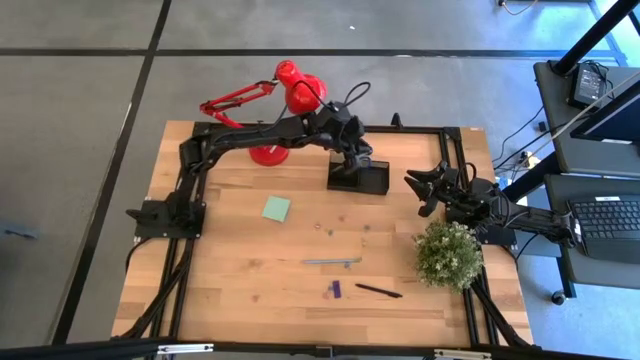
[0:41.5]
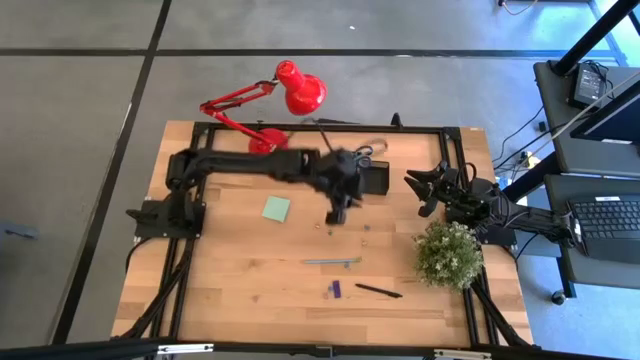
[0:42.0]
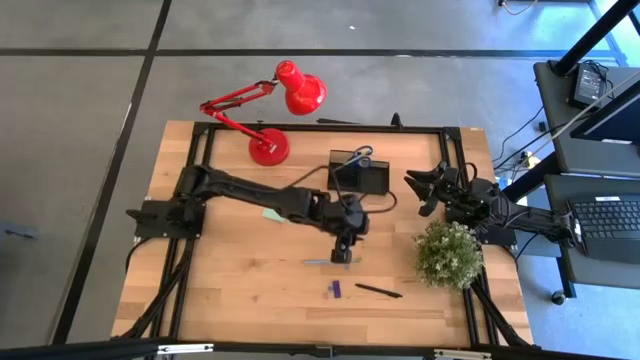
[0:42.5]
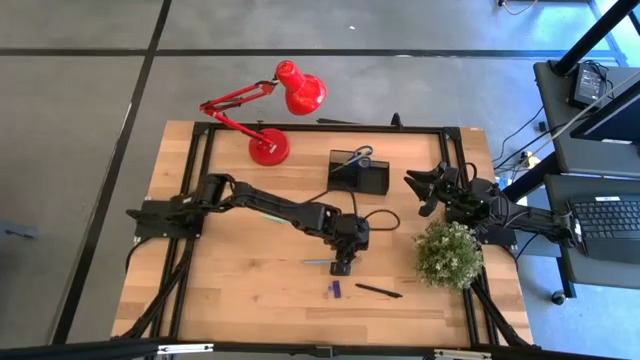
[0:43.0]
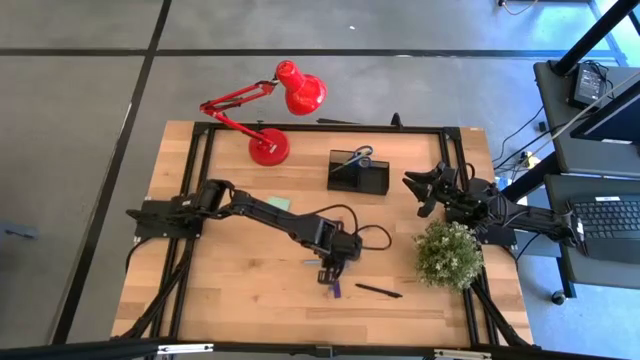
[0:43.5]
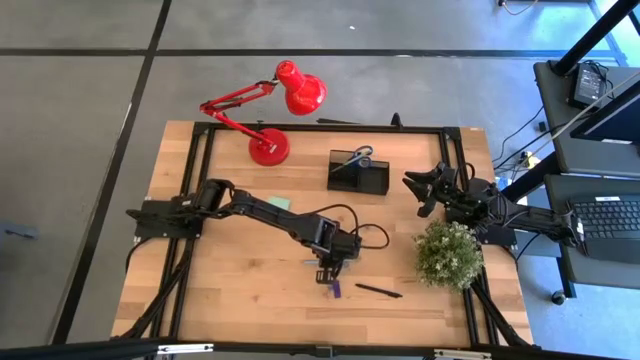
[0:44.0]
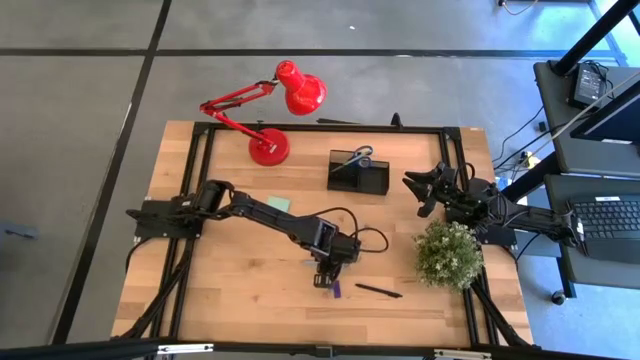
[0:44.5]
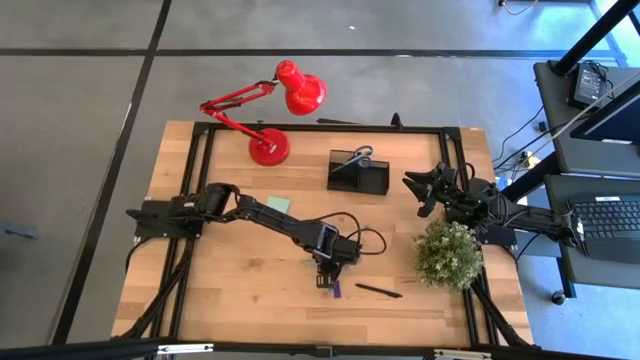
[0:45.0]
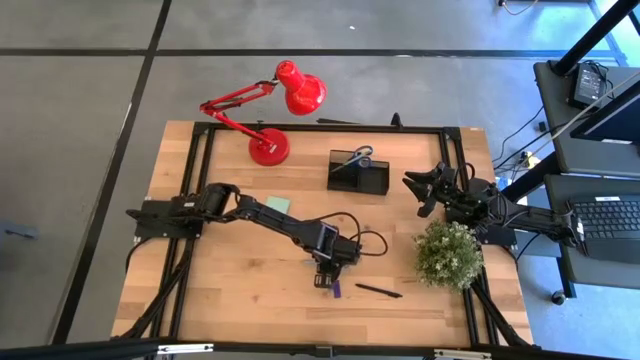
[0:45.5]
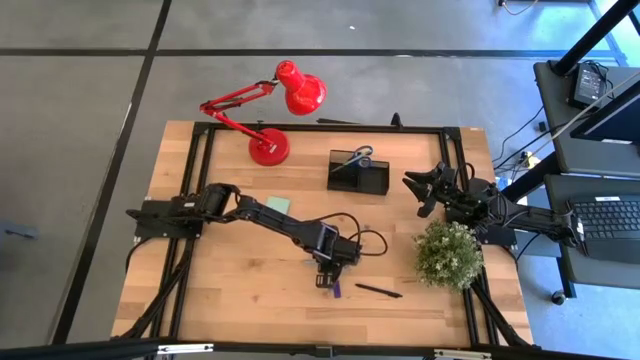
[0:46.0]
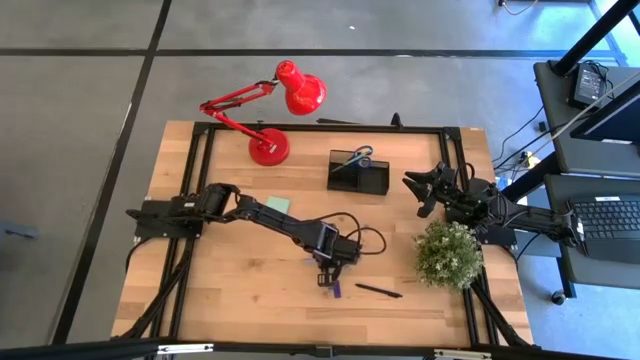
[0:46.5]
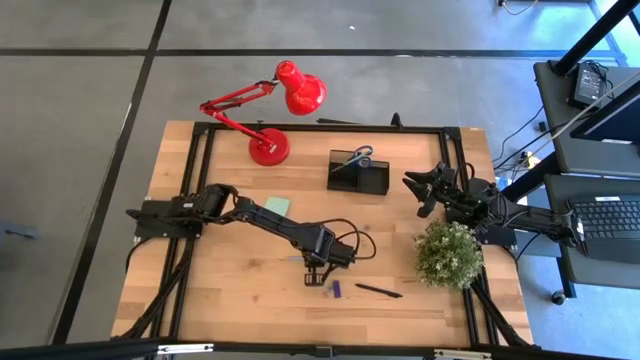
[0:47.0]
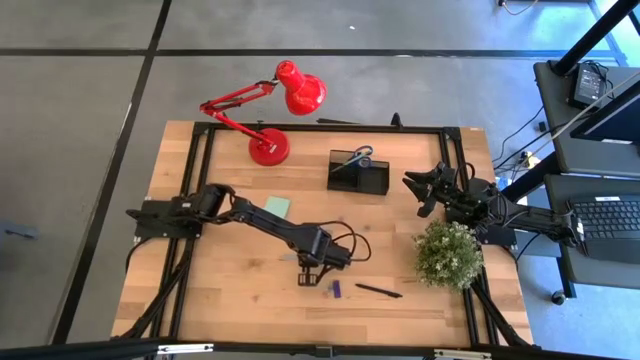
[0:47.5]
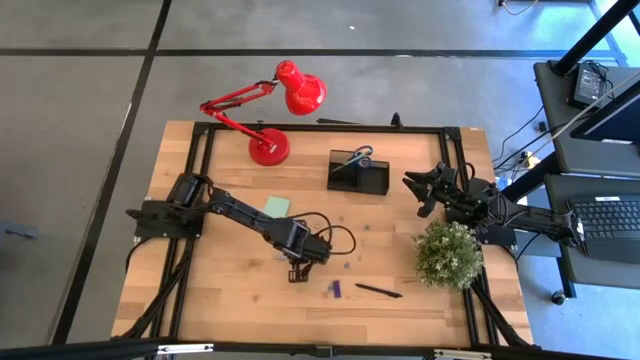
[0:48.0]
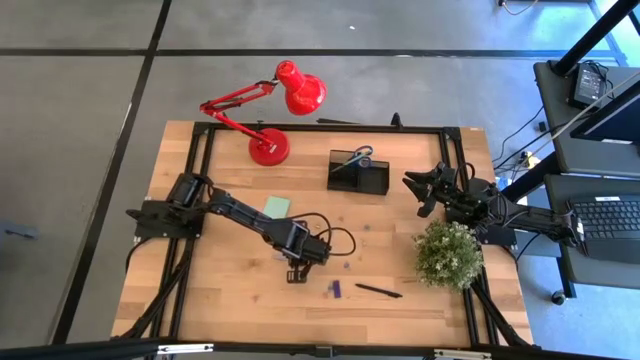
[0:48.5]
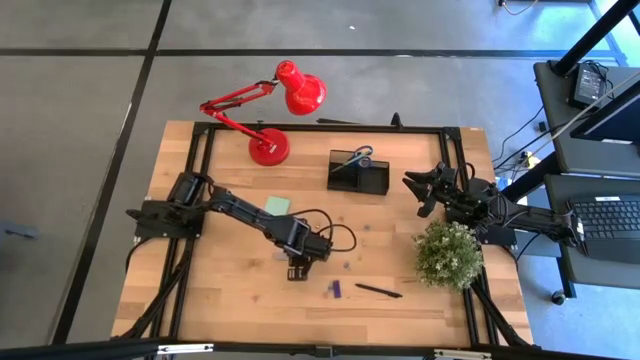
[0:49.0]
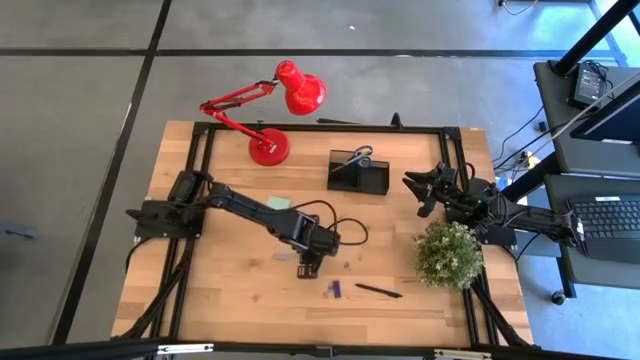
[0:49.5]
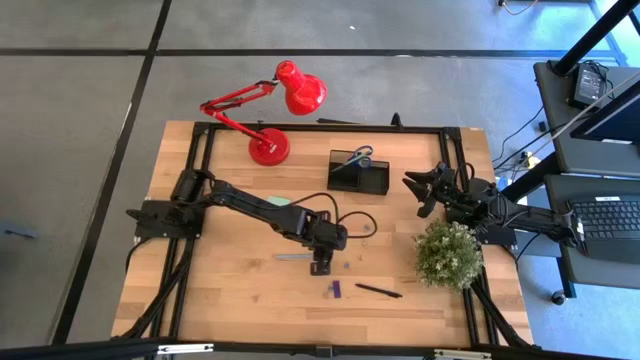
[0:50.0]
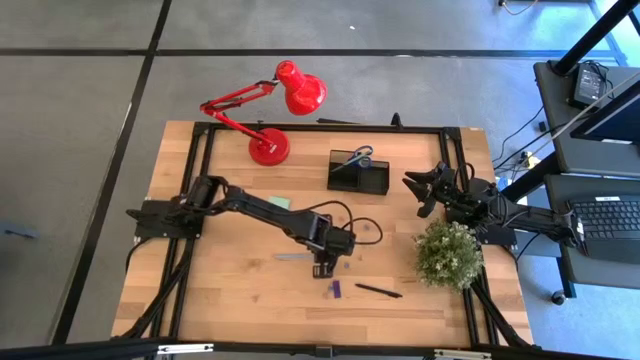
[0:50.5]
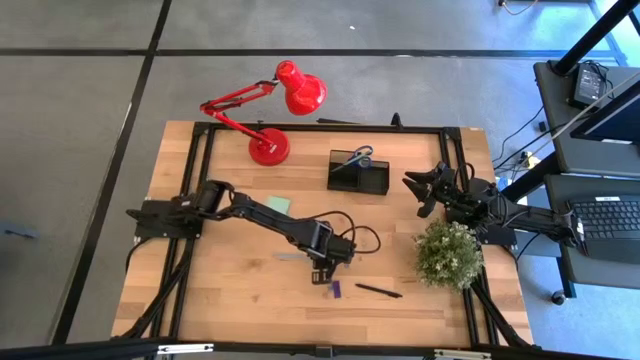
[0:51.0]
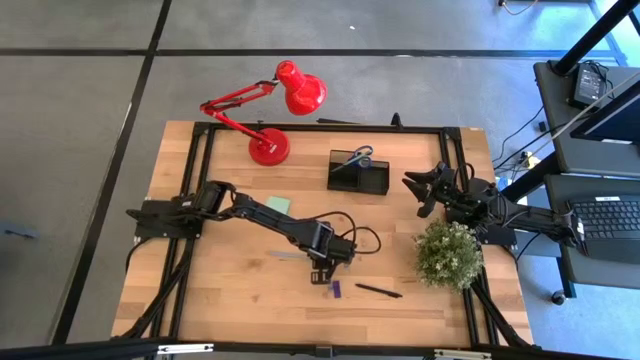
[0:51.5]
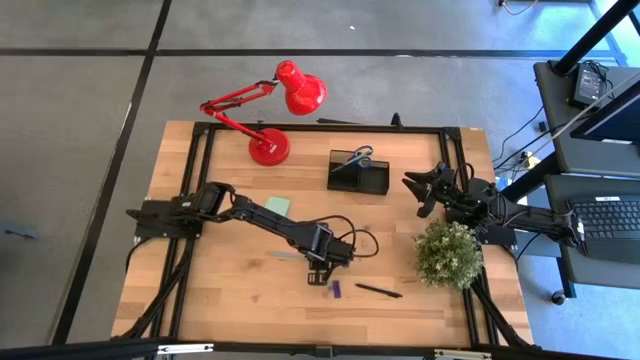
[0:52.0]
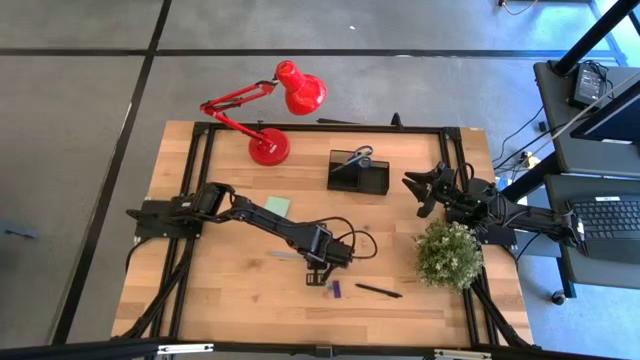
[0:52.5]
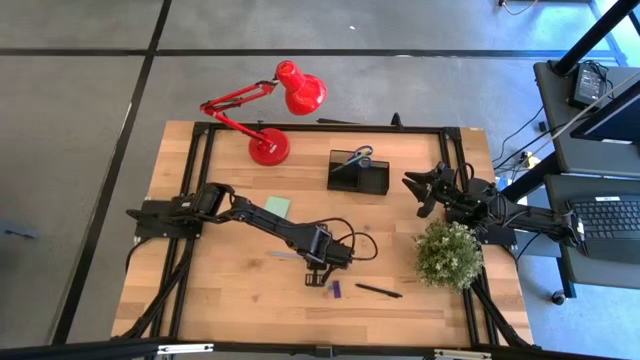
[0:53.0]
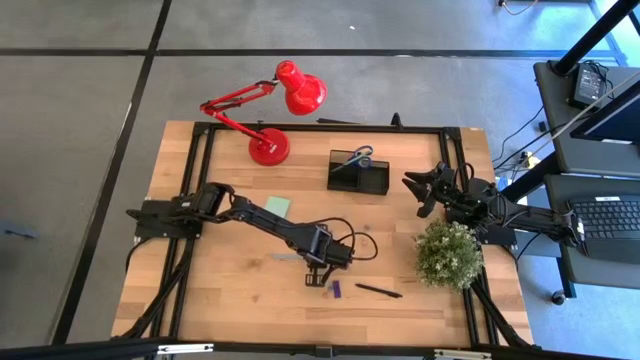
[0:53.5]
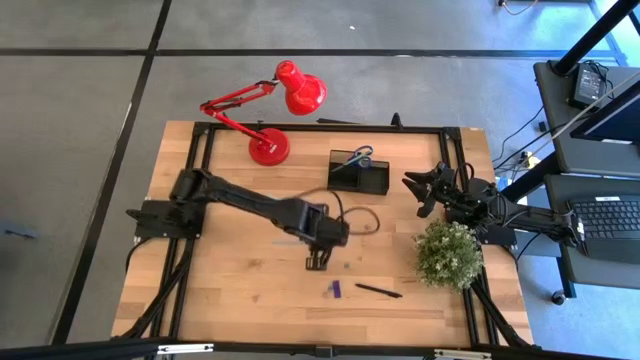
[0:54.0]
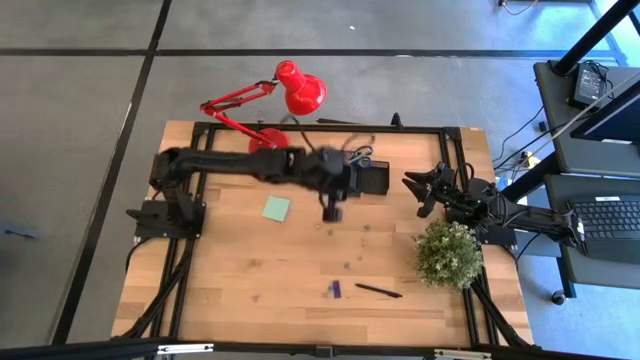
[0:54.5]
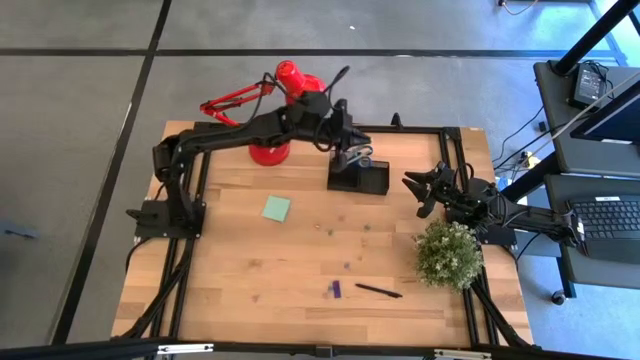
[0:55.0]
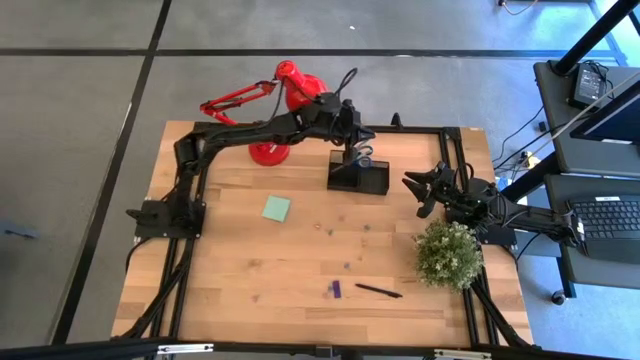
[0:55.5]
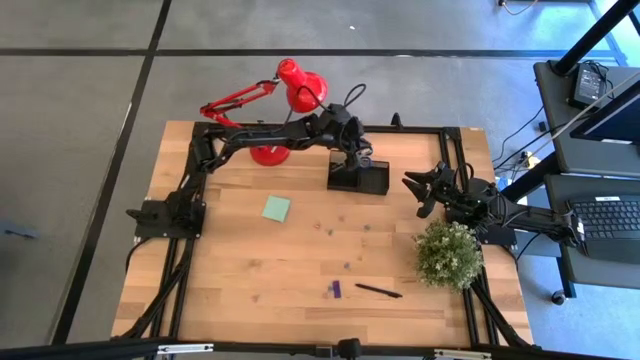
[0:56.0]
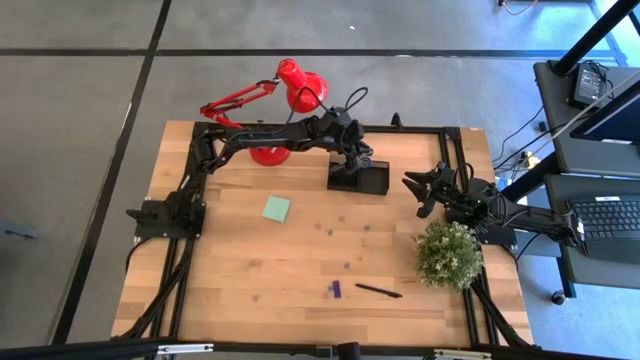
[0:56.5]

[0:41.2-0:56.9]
Task: Pick and place office supplies into organizer
Put the blue pencil into the black desk organizer

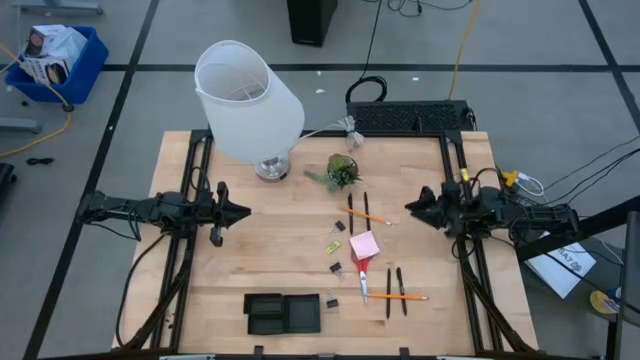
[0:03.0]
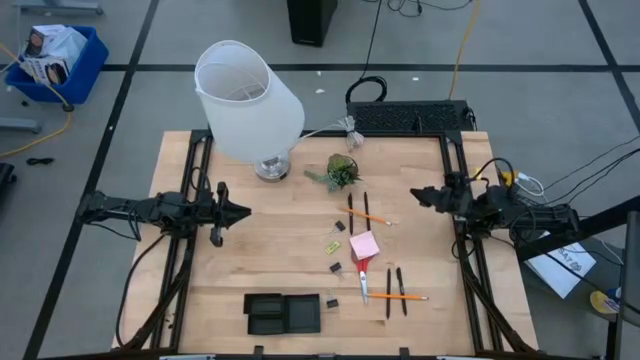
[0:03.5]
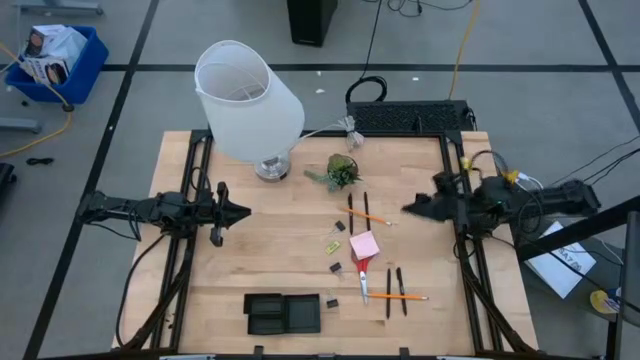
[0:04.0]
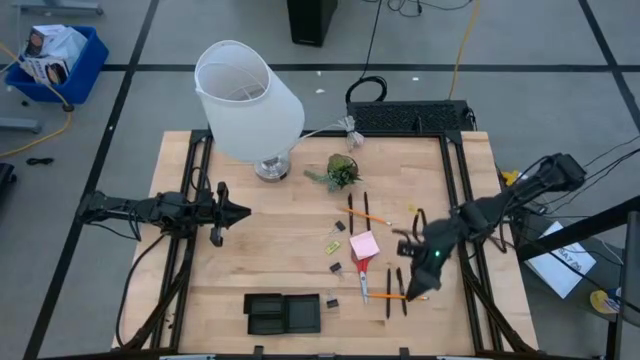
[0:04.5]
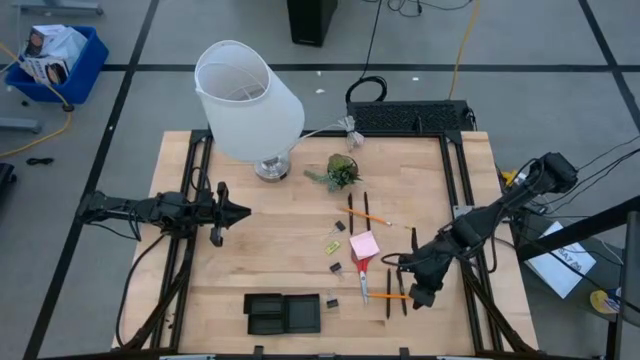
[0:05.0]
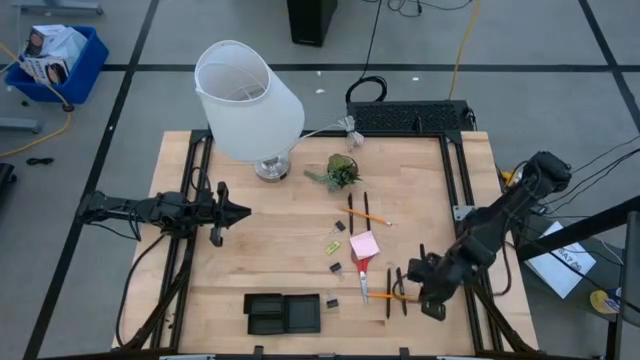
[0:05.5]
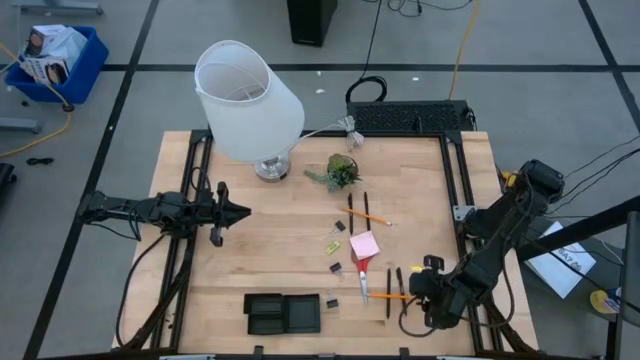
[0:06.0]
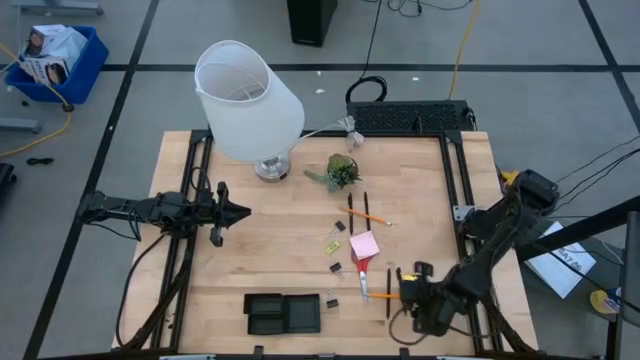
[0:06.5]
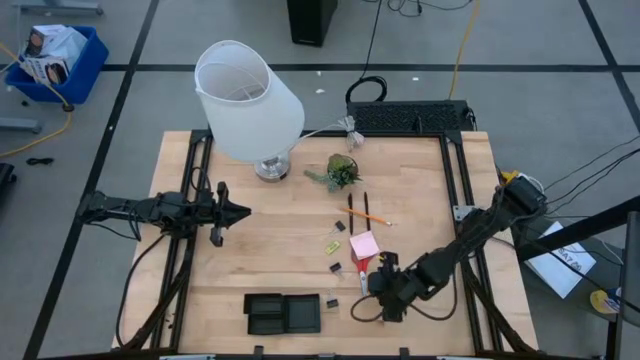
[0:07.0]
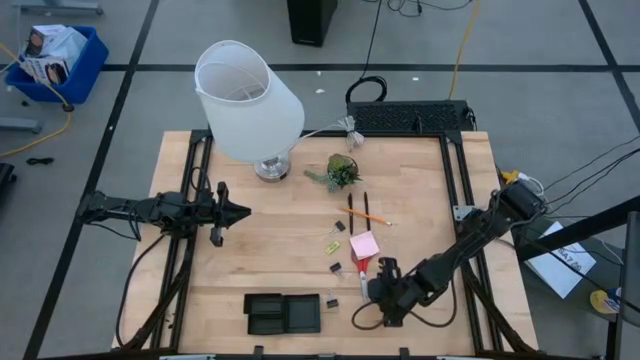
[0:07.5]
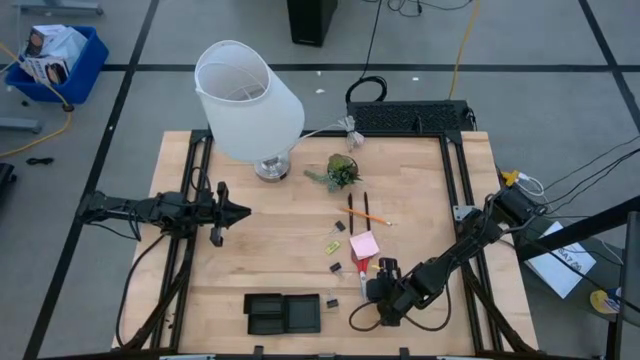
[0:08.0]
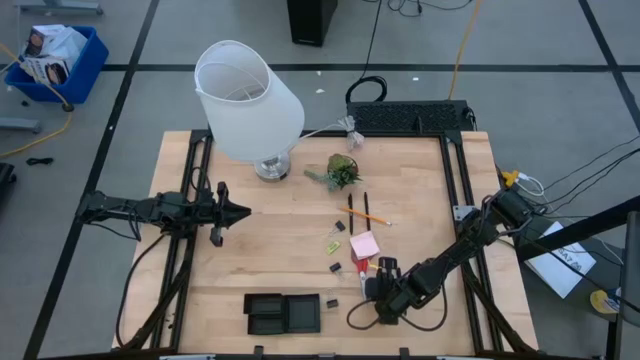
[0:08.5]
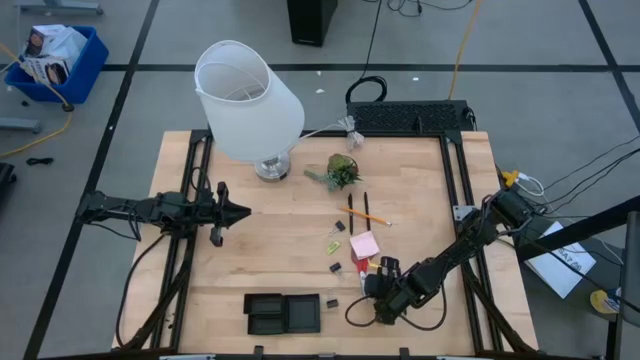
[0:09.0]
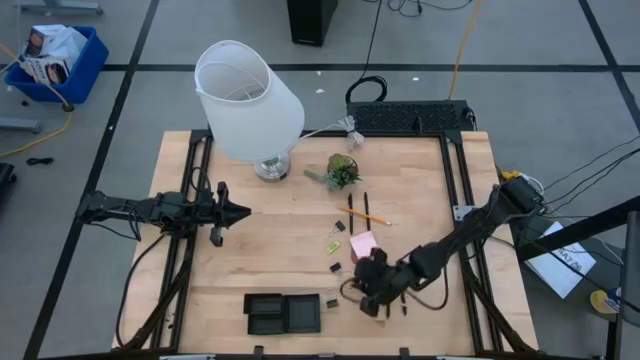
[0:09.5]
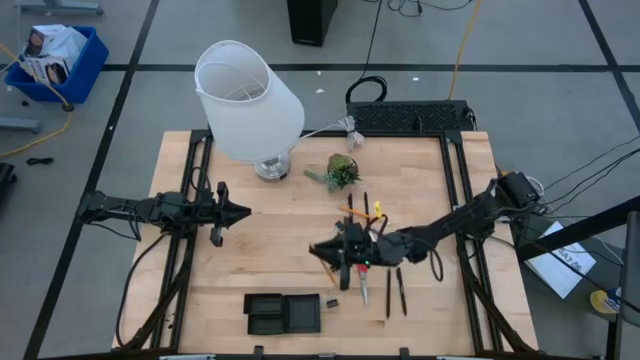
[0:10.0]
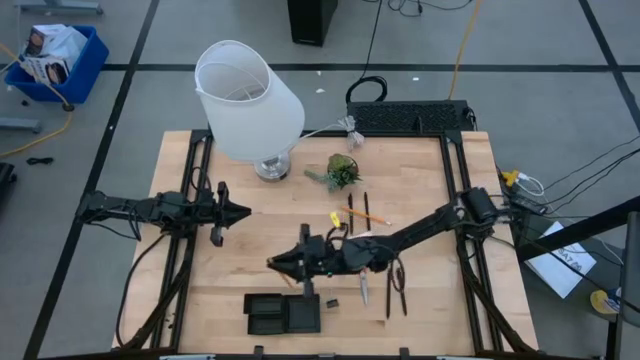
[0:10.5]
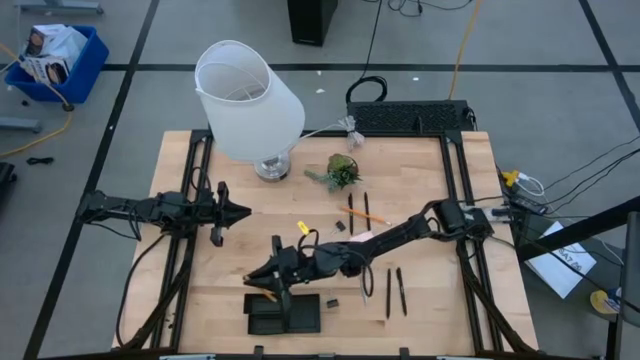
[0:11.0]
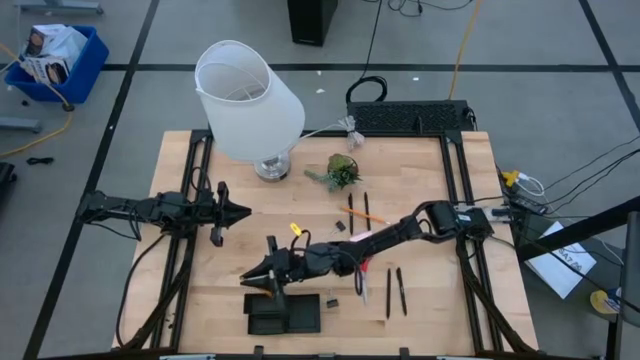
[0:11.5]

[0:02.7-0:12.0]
Task: Pick and place office supplies into organizer
Put the bottom yellow pencil into the mesh desk organizer
